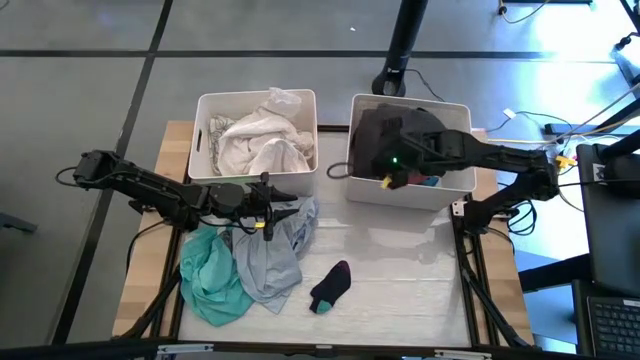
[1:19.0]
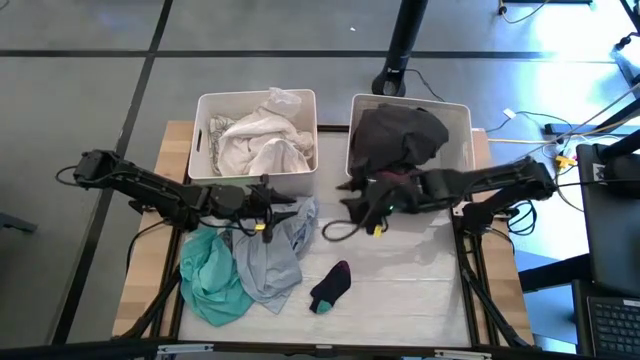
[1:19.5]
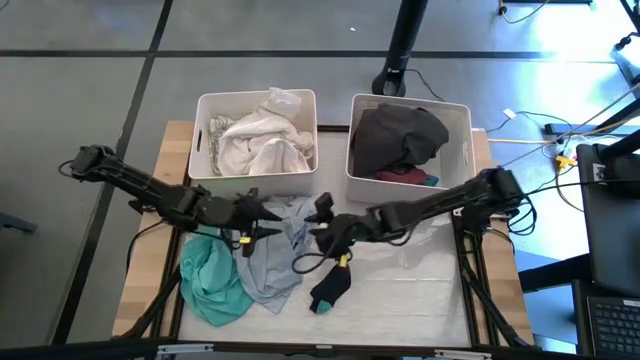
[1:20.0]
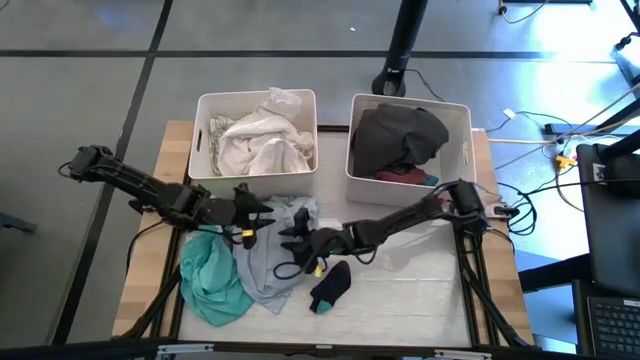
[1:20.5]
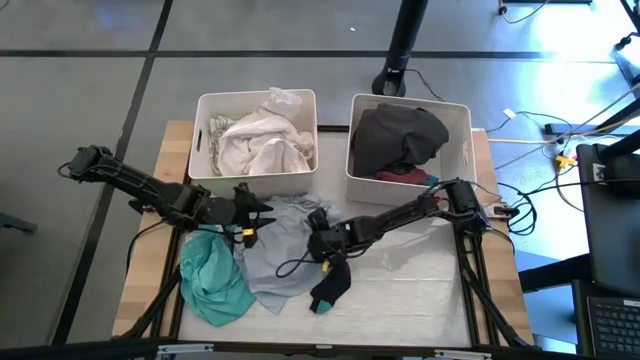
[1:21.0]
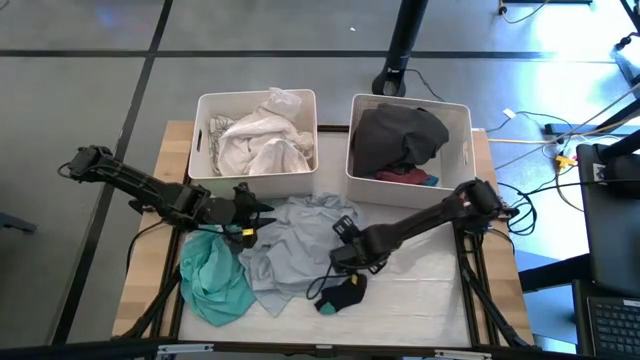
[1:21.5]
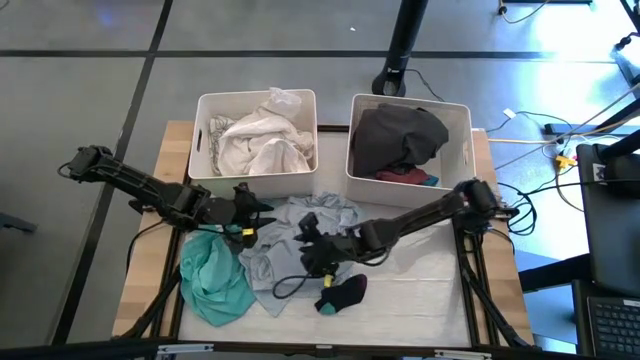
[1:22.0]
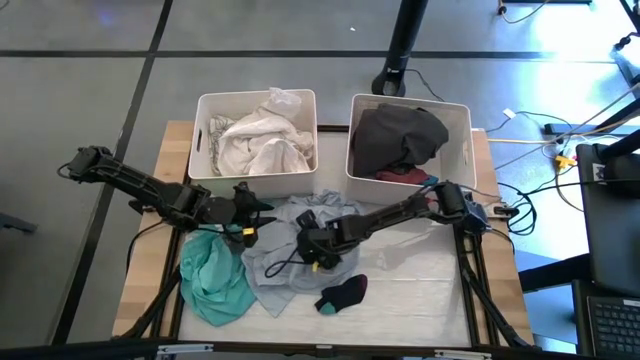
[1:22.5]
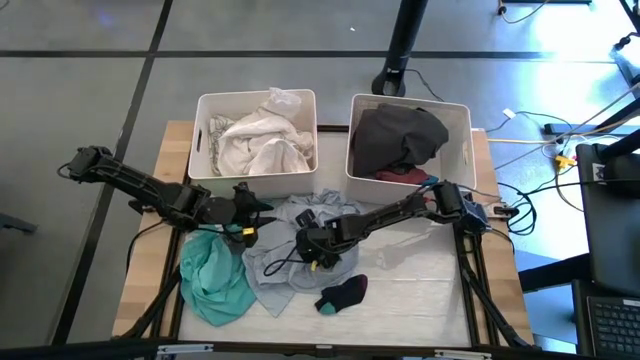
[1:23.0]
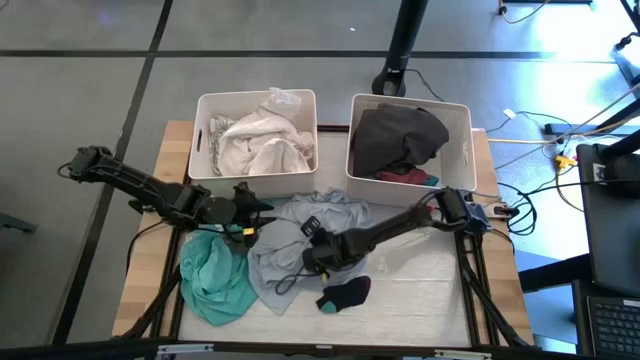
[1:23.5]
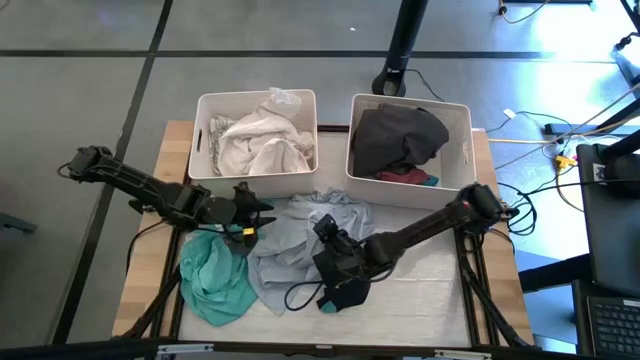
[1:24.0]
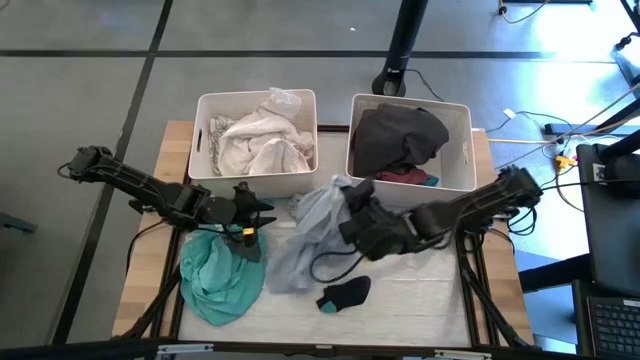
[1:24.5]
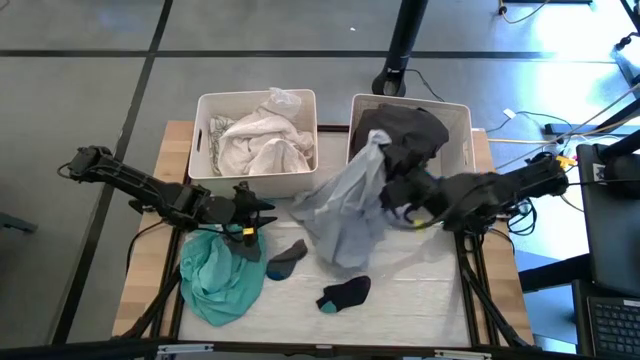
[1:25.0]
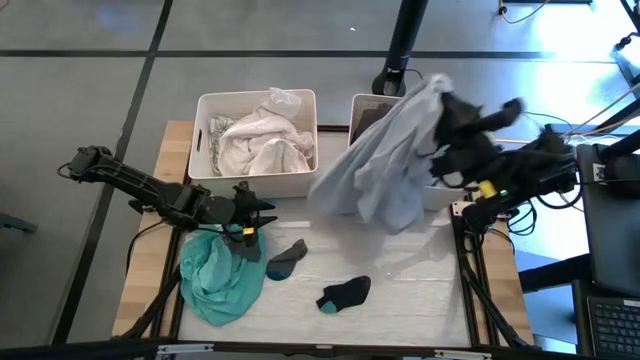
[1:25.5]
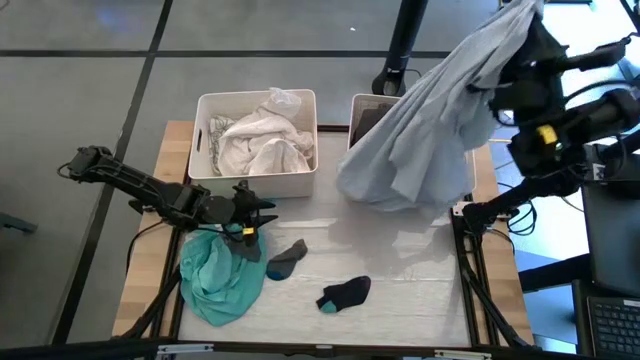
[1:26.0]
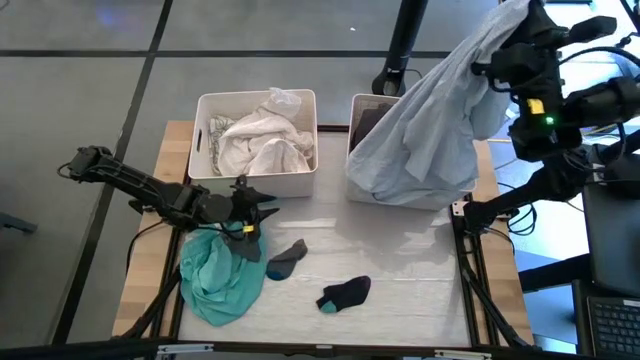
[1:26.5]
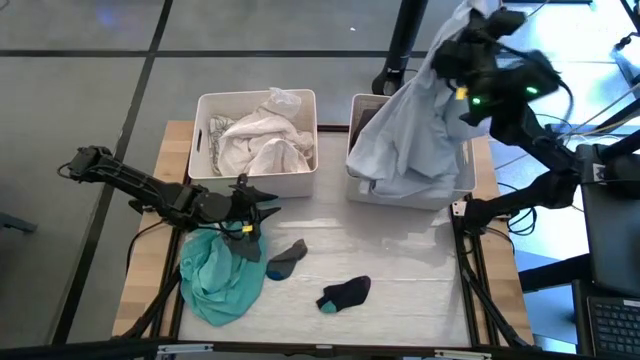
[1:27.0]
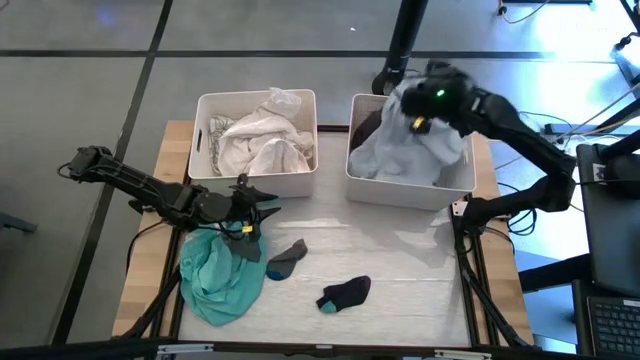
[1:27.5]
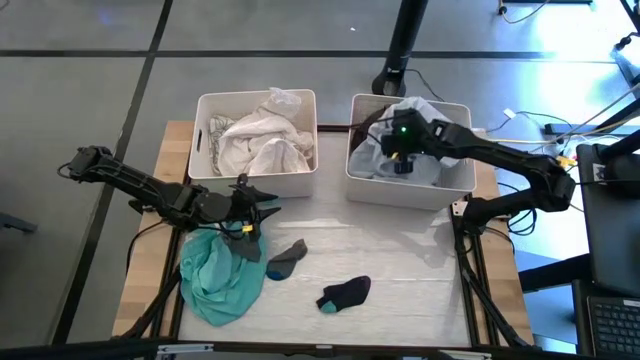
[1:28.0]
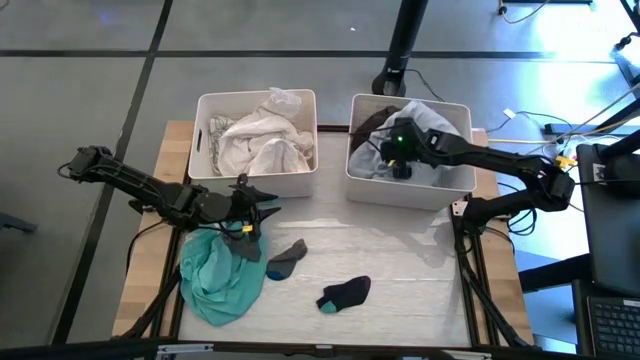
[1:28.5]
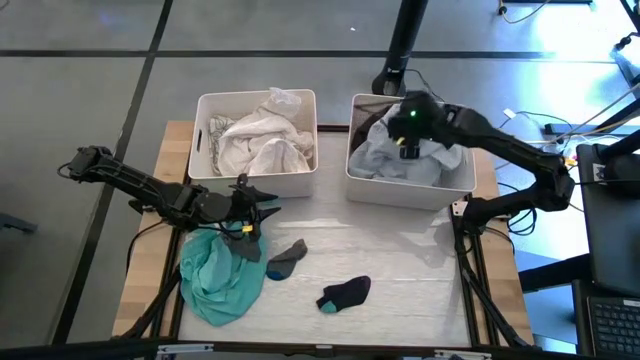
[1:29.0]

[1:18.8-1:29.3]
Task: Sort clothes
Put the blue patient gown into the right white bin

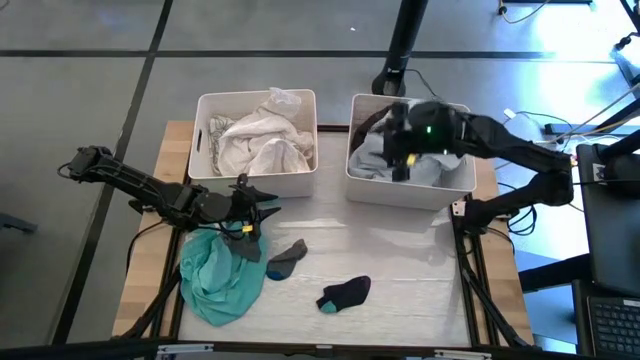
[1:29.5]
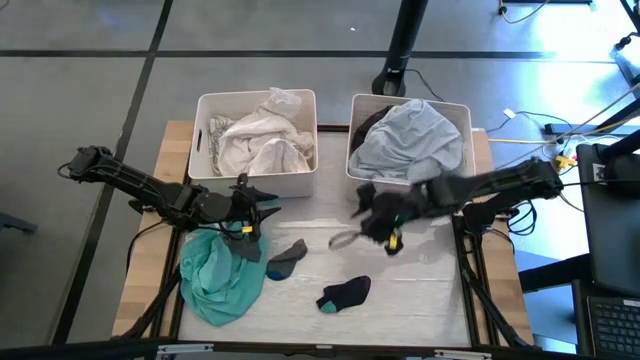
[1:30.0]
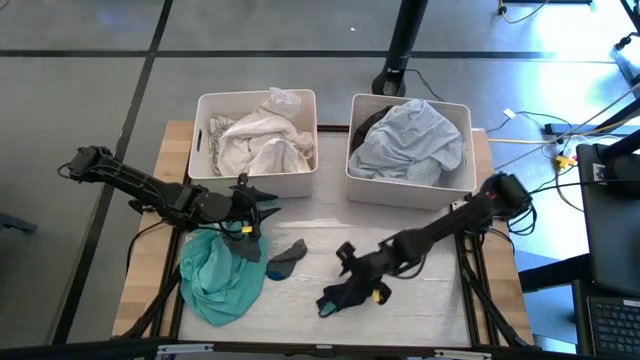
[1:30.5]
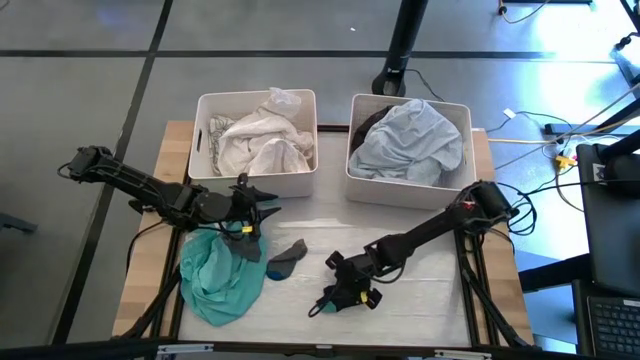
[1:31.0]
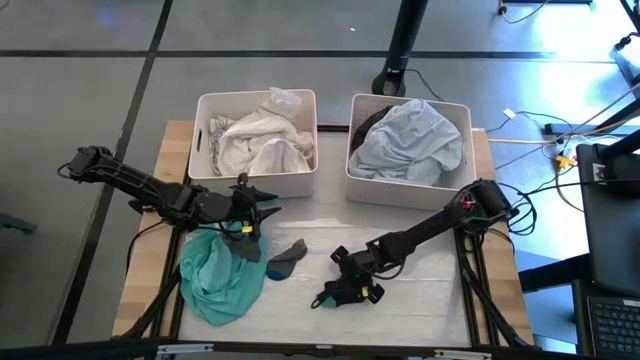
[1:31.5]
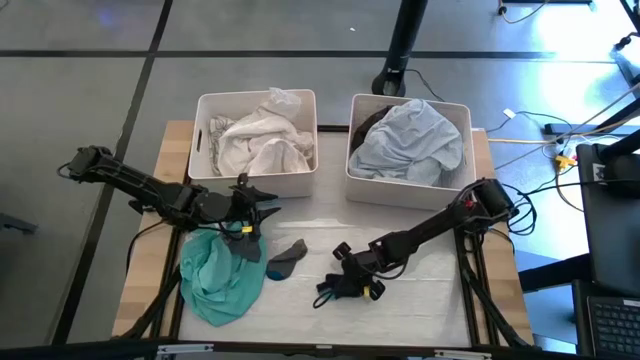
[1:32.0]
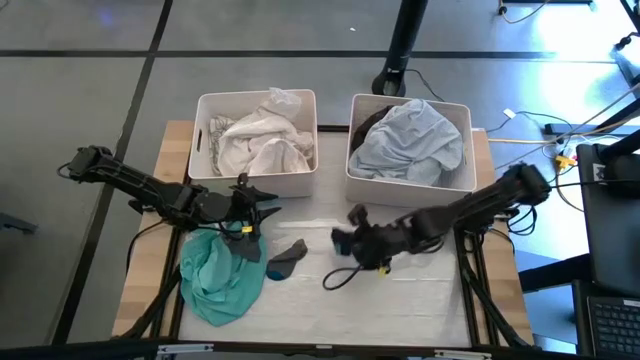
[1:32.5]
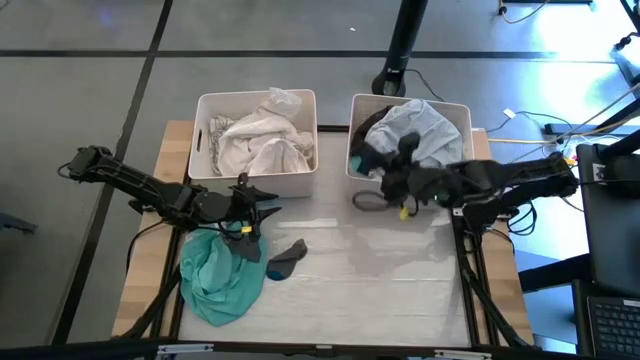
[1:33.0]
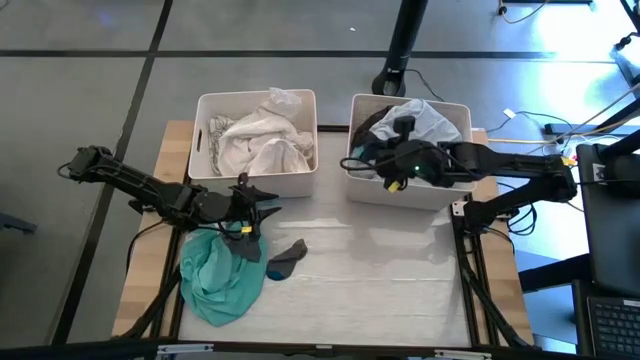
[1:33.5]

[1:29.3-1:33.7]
Put the dark blue sock into the right white bin

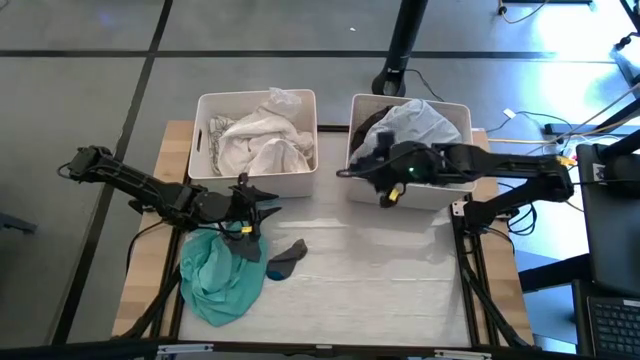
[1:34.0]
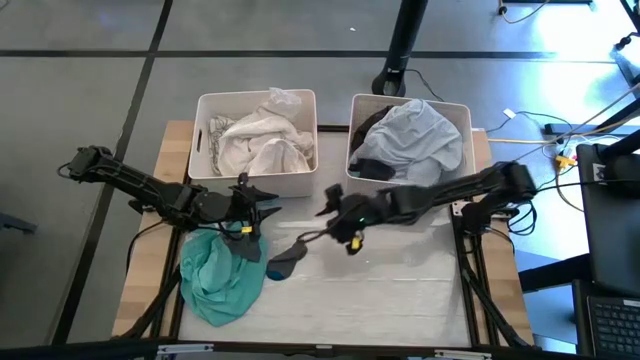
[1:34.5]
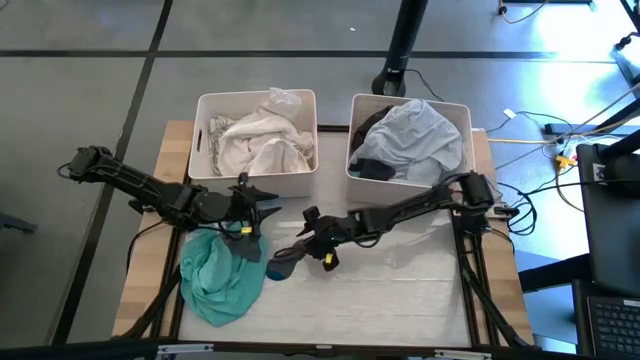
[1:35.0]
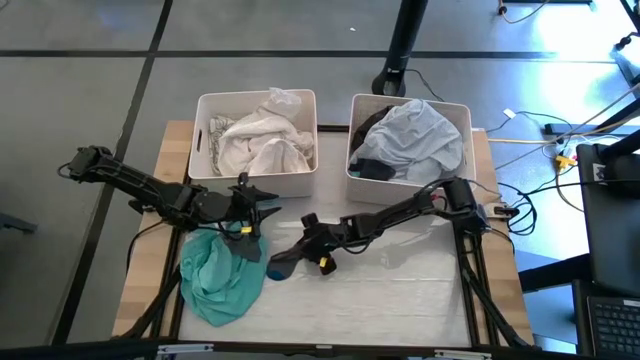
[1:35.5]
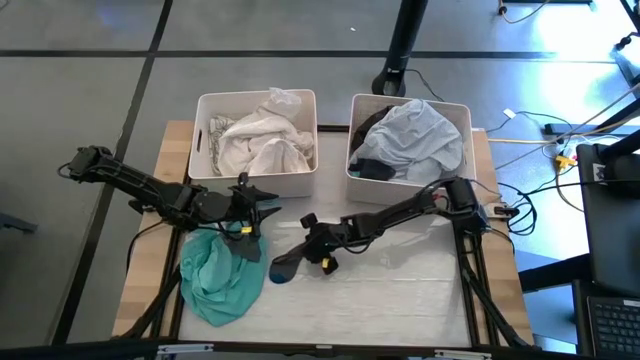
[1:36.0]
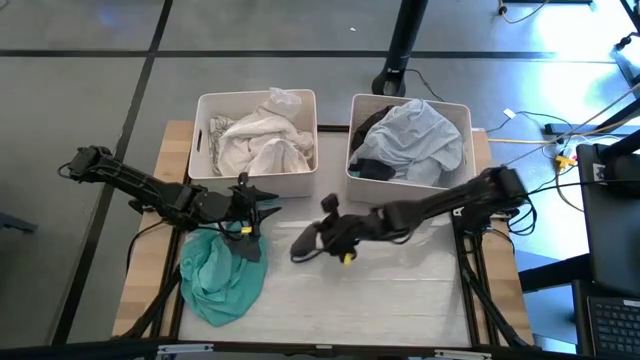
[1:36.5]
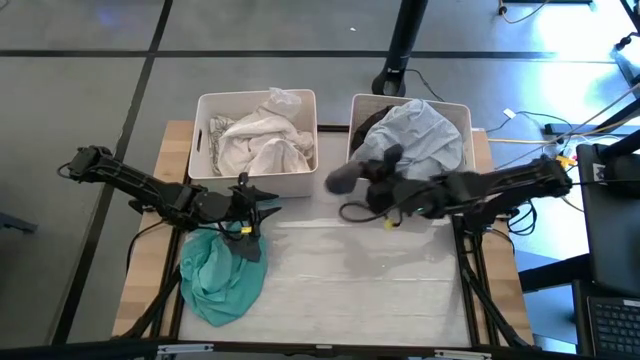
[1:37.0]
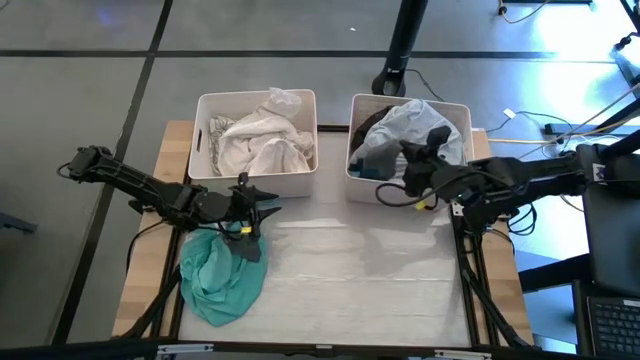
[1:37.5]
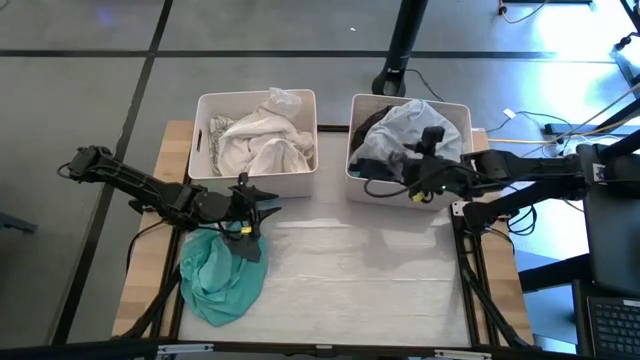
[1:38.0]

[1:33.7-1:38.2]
Put the gray sock into the right white bin

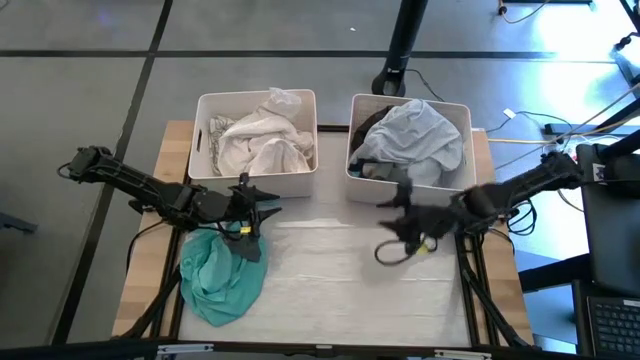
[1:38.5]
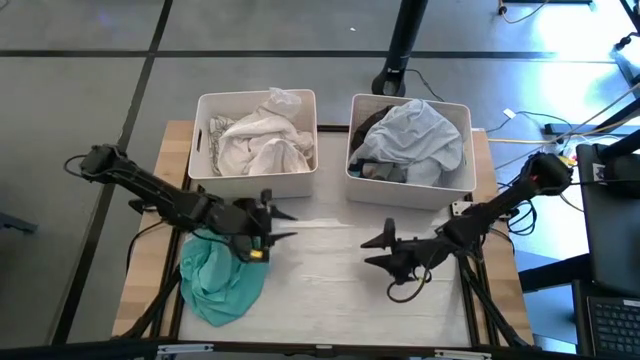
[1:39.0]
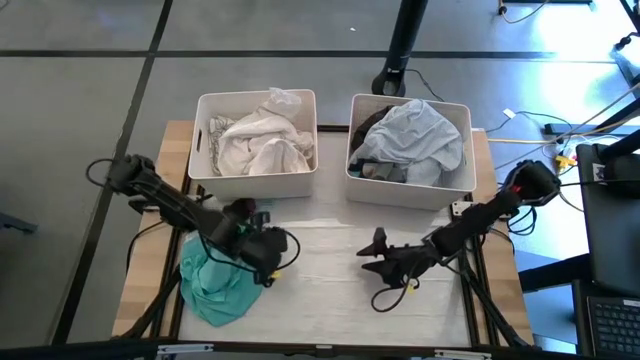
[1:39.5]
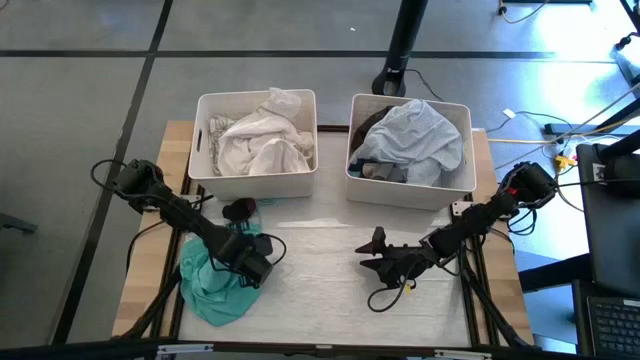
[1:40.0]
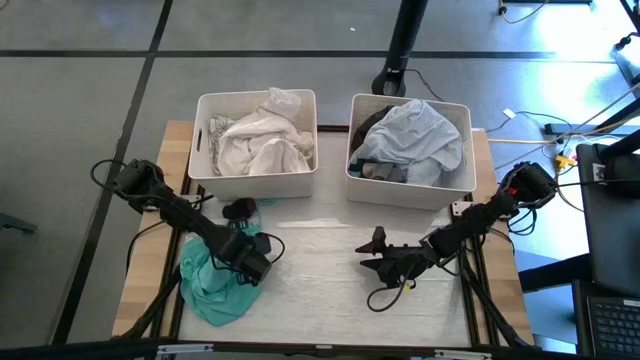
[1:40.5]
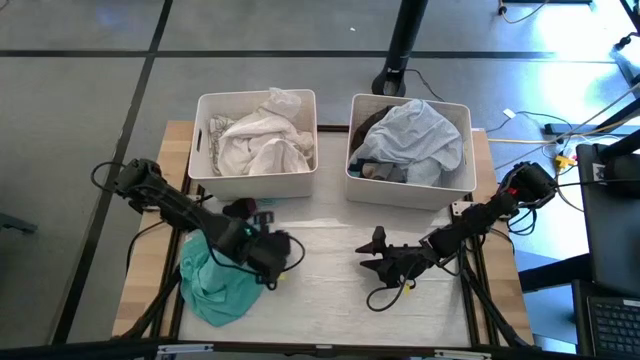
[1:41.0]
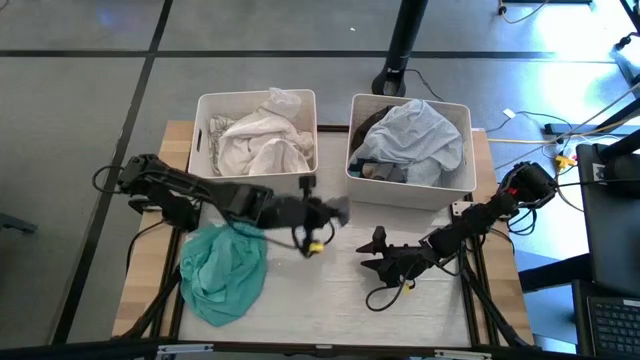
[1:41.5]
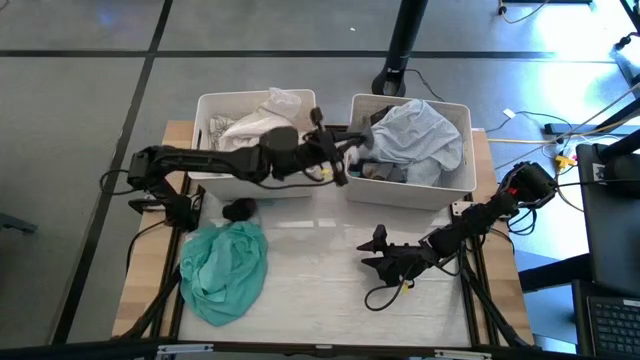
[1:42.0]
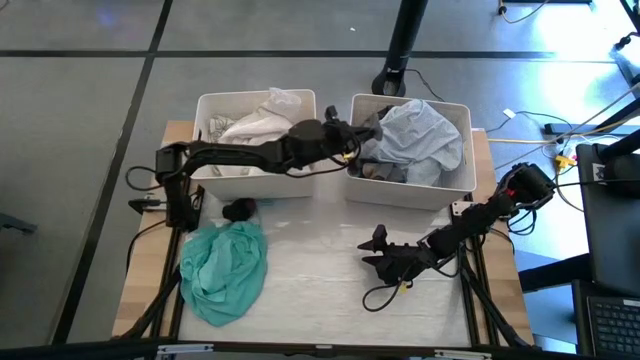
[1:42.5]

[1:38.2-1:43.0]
Put the gray sock into the right white bin
